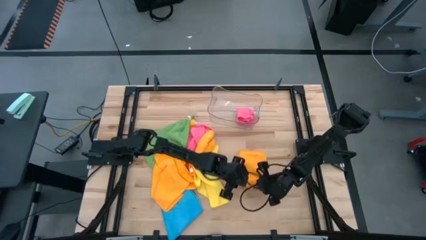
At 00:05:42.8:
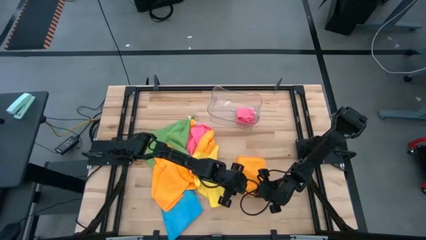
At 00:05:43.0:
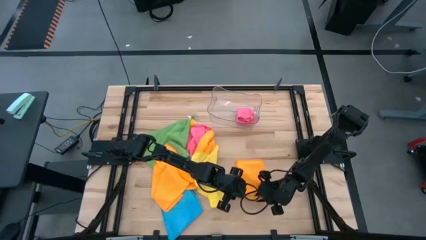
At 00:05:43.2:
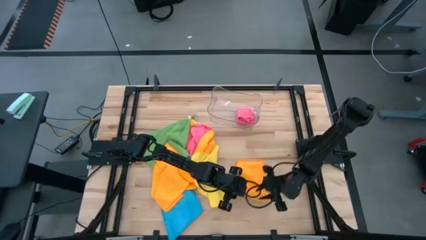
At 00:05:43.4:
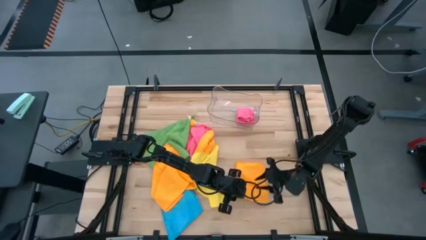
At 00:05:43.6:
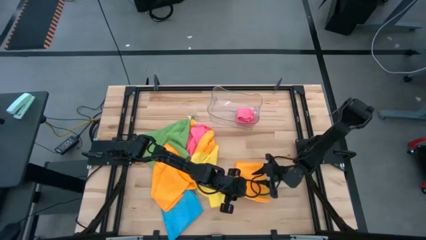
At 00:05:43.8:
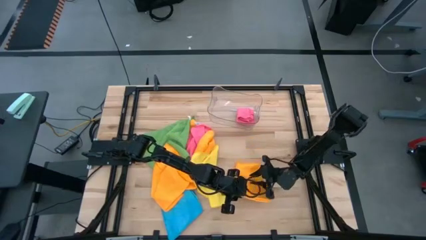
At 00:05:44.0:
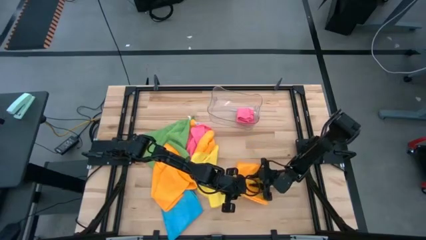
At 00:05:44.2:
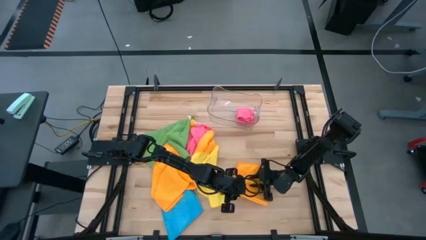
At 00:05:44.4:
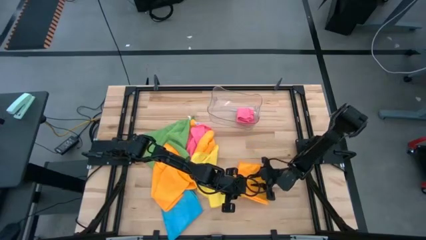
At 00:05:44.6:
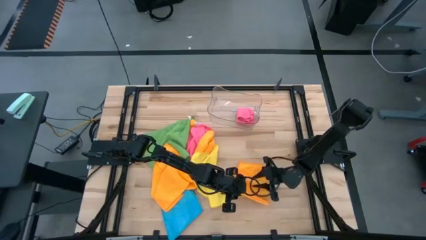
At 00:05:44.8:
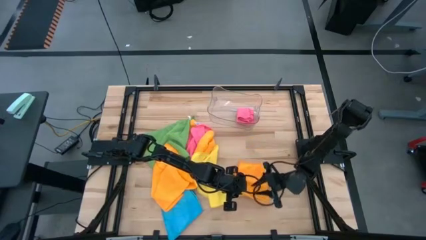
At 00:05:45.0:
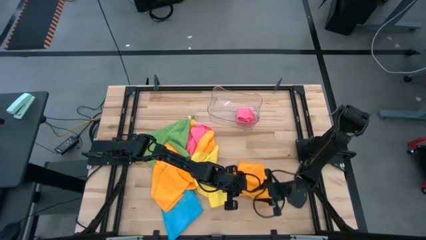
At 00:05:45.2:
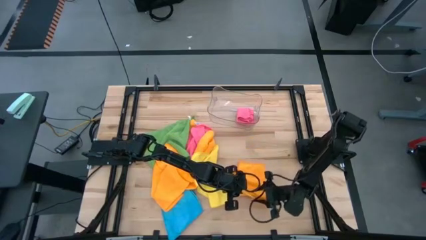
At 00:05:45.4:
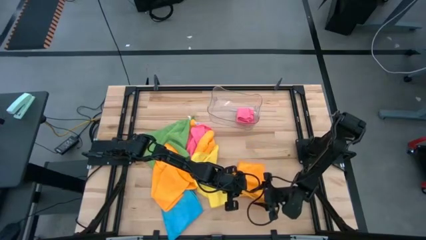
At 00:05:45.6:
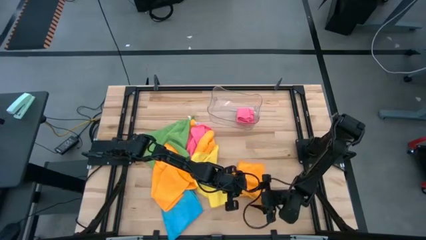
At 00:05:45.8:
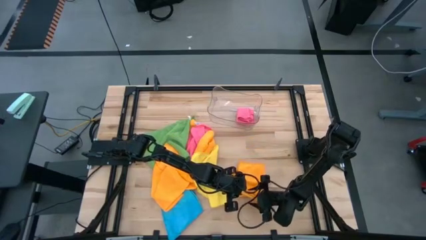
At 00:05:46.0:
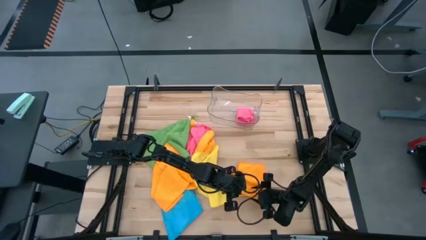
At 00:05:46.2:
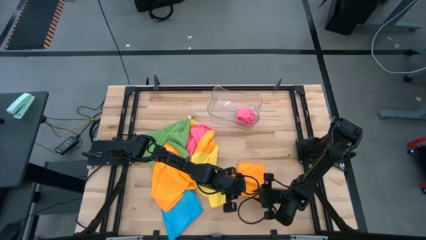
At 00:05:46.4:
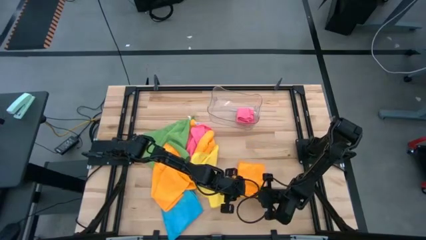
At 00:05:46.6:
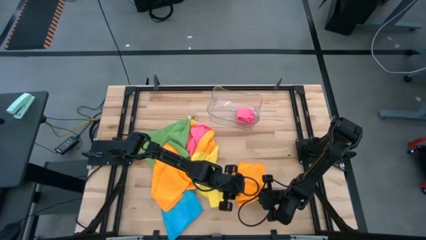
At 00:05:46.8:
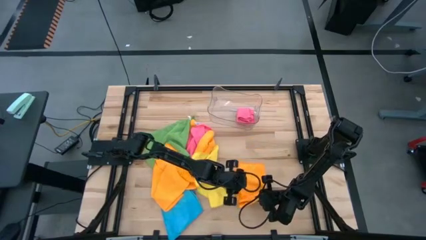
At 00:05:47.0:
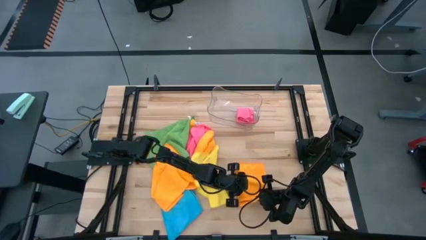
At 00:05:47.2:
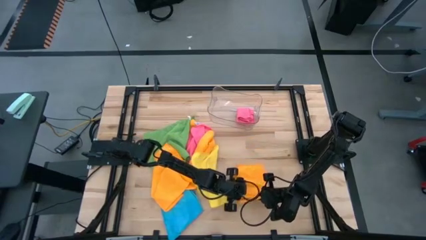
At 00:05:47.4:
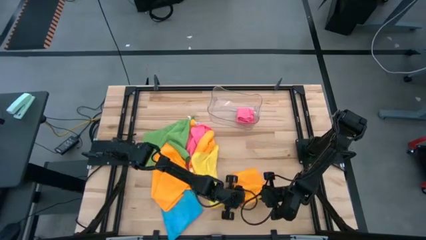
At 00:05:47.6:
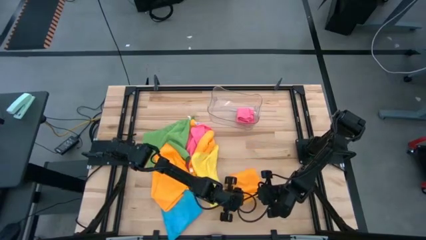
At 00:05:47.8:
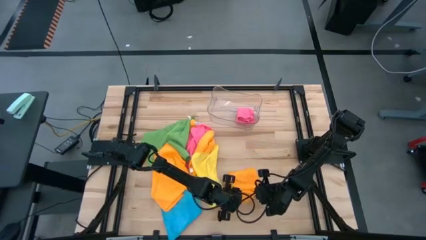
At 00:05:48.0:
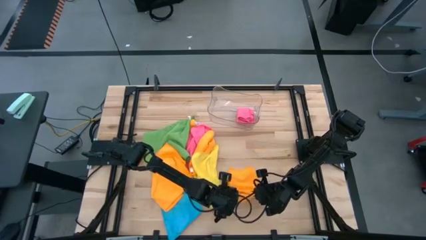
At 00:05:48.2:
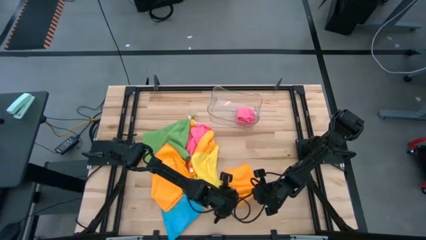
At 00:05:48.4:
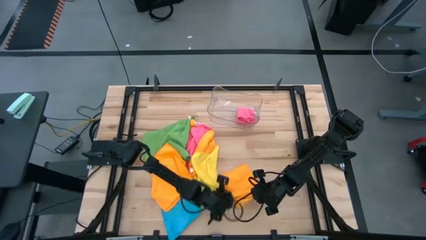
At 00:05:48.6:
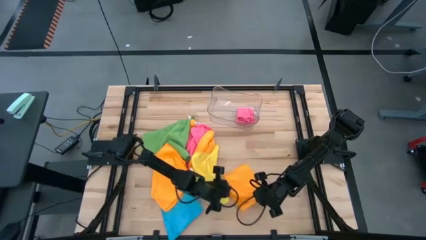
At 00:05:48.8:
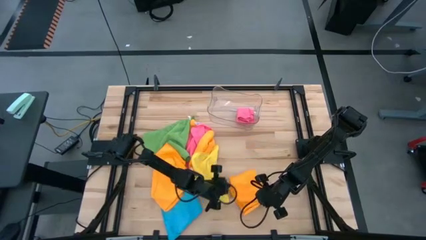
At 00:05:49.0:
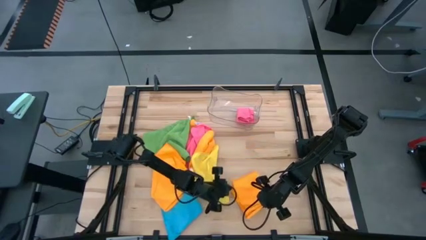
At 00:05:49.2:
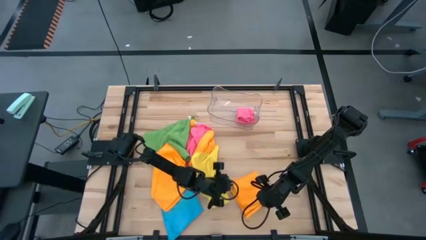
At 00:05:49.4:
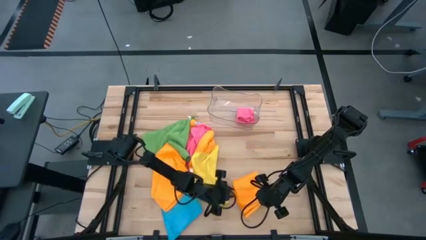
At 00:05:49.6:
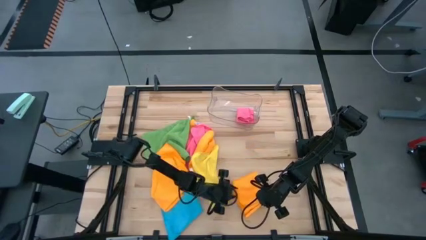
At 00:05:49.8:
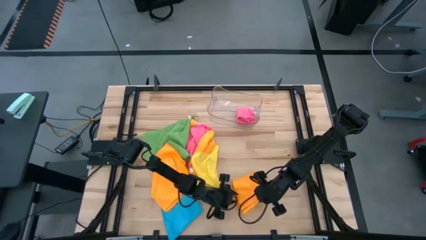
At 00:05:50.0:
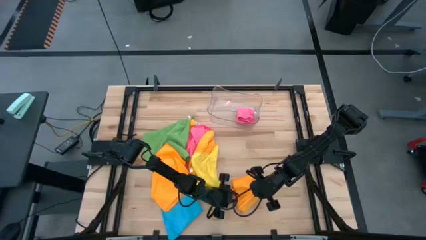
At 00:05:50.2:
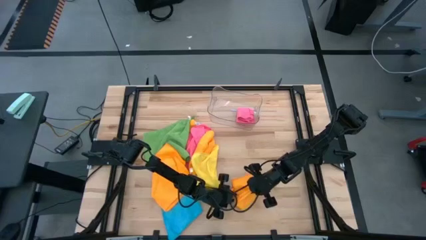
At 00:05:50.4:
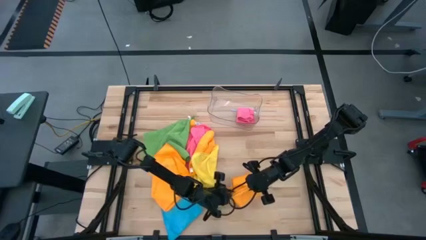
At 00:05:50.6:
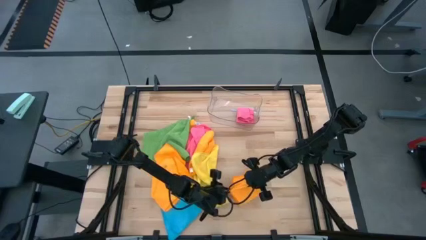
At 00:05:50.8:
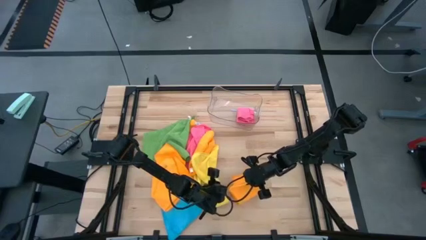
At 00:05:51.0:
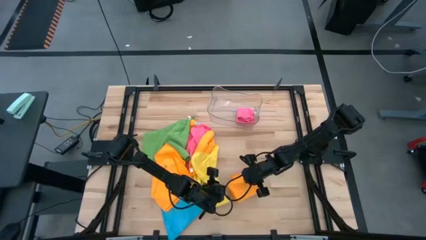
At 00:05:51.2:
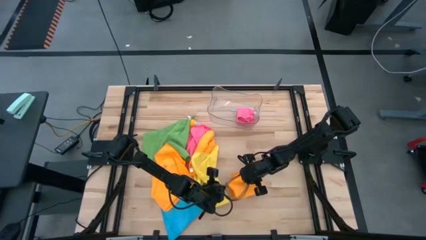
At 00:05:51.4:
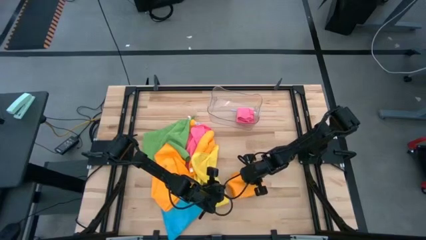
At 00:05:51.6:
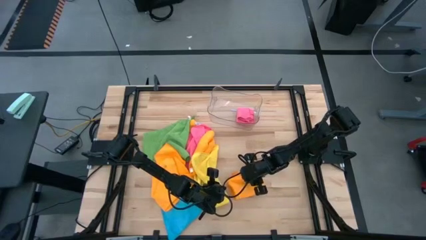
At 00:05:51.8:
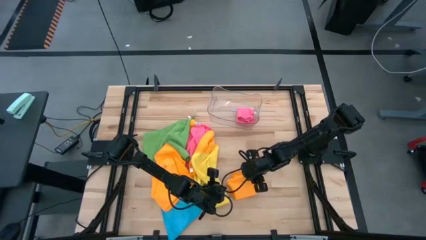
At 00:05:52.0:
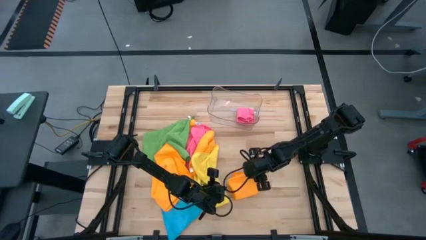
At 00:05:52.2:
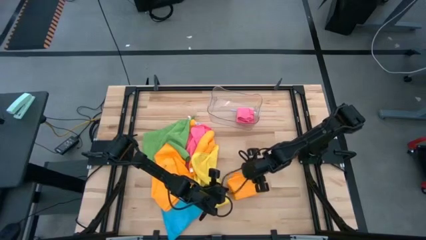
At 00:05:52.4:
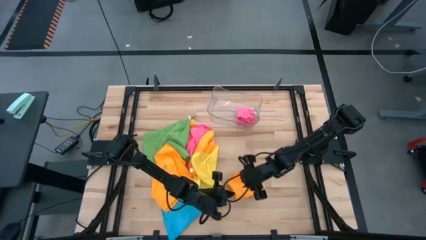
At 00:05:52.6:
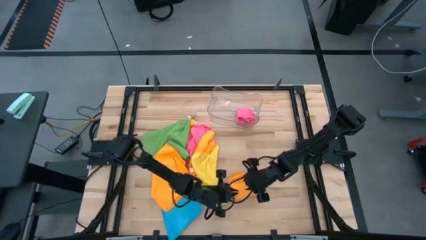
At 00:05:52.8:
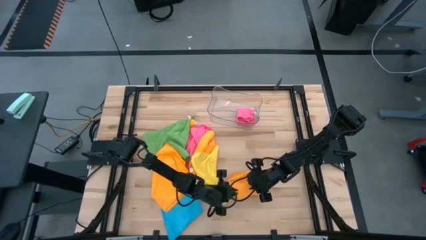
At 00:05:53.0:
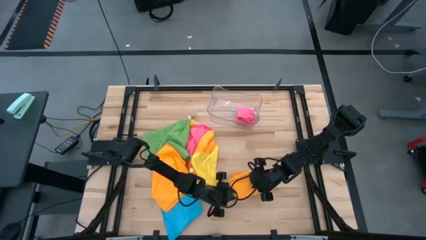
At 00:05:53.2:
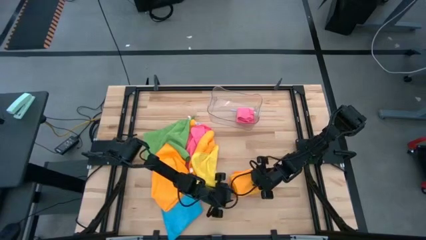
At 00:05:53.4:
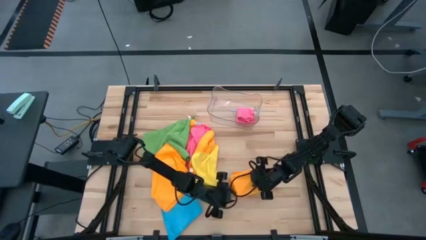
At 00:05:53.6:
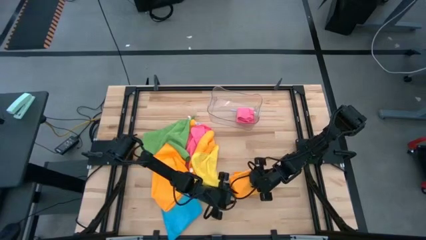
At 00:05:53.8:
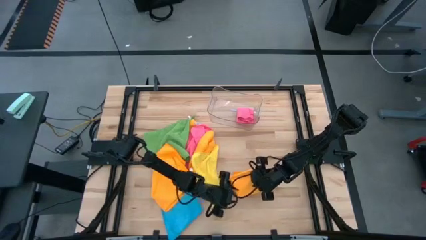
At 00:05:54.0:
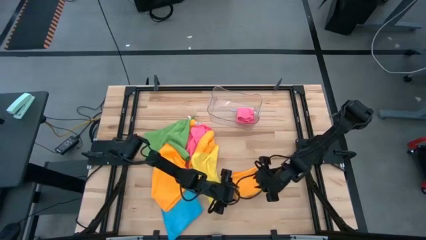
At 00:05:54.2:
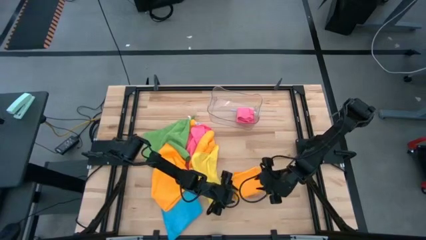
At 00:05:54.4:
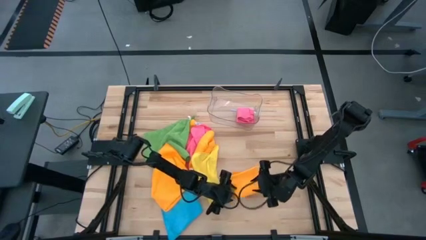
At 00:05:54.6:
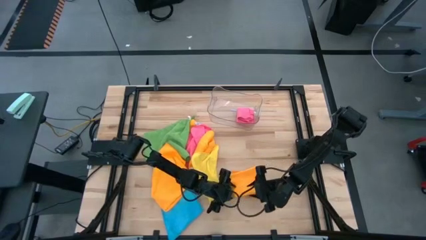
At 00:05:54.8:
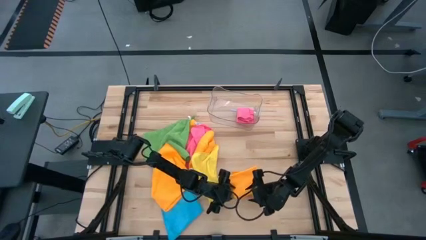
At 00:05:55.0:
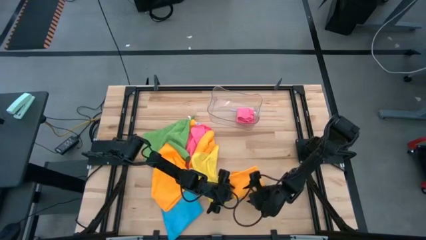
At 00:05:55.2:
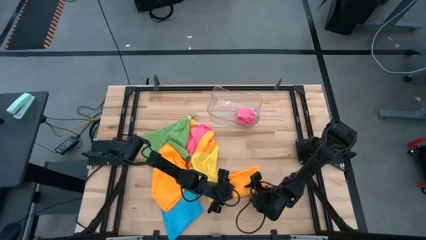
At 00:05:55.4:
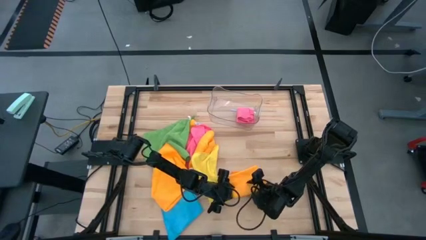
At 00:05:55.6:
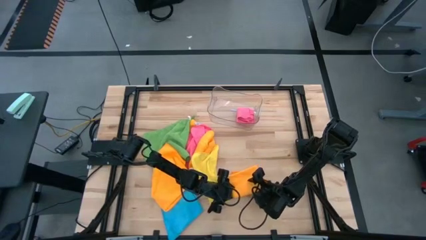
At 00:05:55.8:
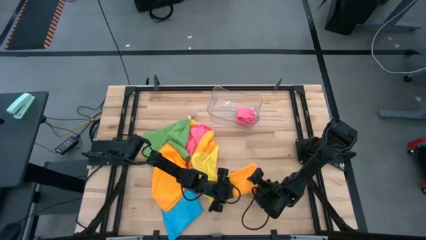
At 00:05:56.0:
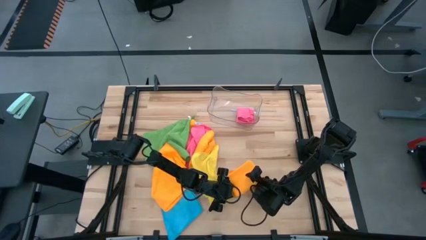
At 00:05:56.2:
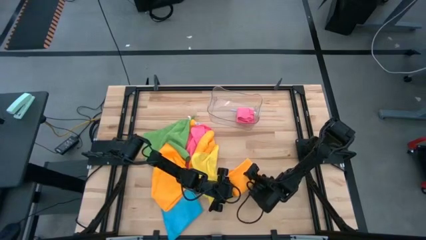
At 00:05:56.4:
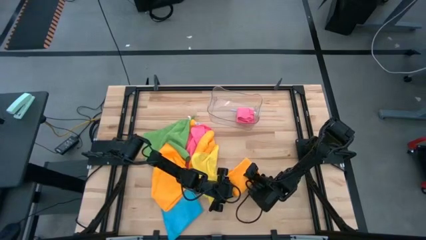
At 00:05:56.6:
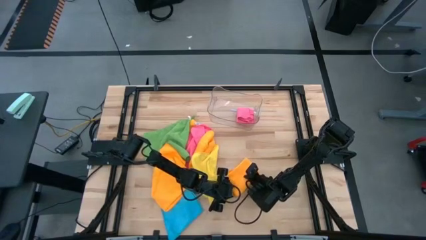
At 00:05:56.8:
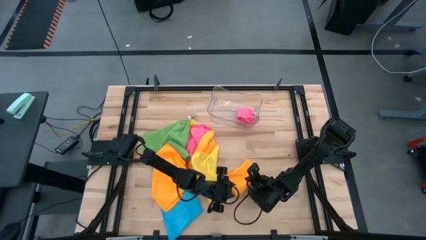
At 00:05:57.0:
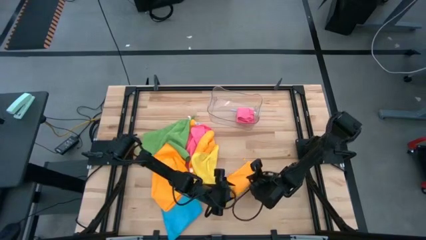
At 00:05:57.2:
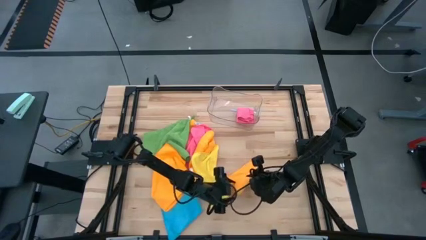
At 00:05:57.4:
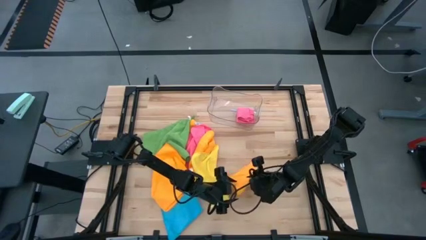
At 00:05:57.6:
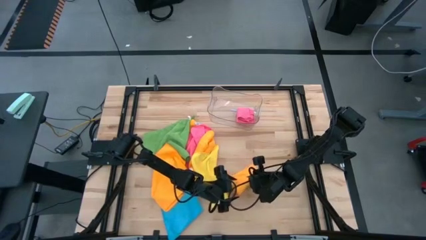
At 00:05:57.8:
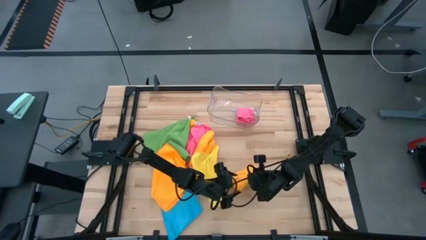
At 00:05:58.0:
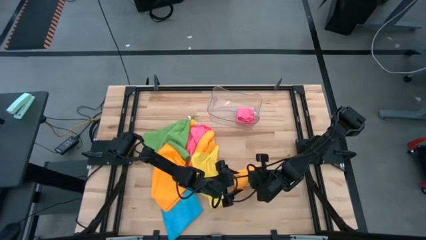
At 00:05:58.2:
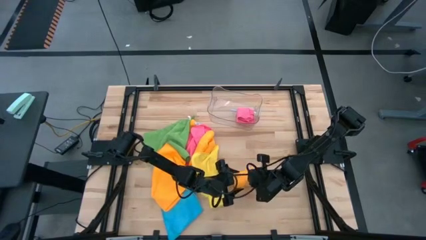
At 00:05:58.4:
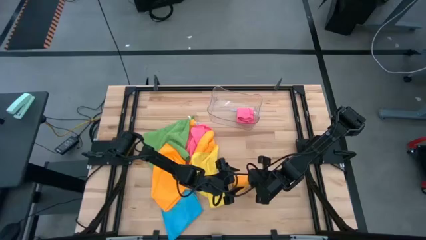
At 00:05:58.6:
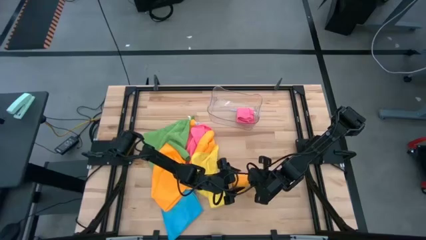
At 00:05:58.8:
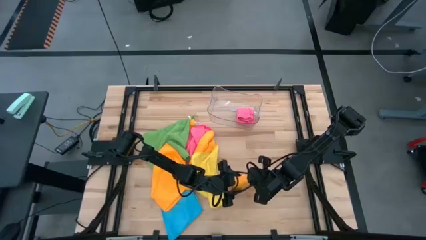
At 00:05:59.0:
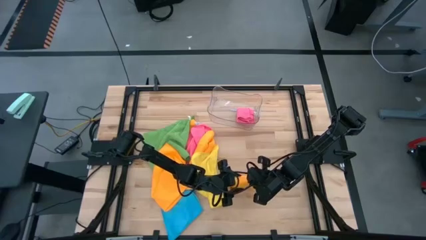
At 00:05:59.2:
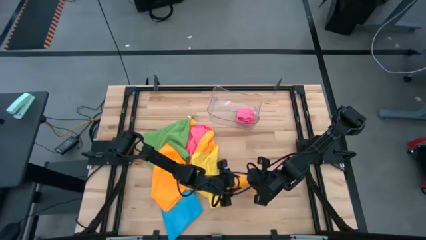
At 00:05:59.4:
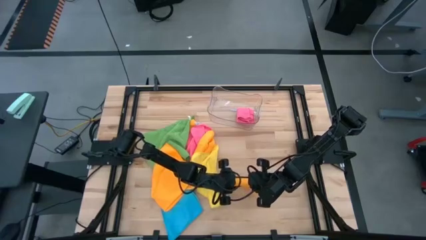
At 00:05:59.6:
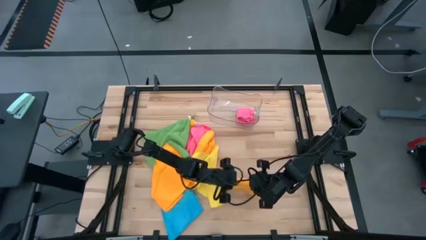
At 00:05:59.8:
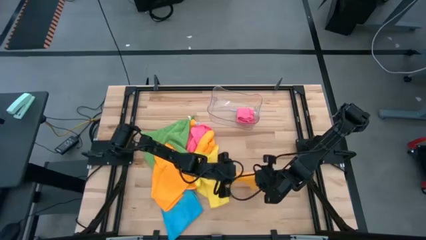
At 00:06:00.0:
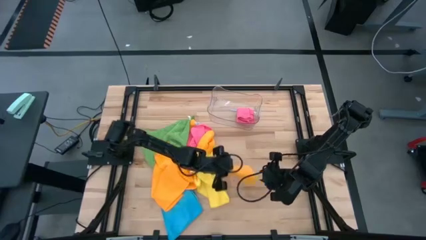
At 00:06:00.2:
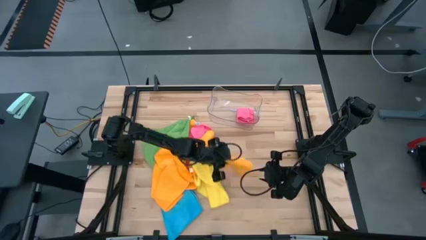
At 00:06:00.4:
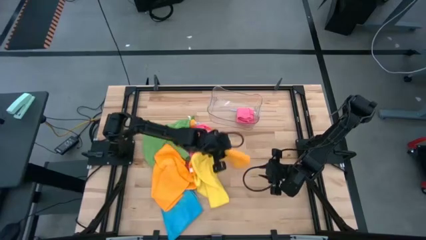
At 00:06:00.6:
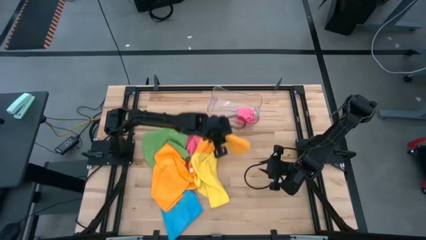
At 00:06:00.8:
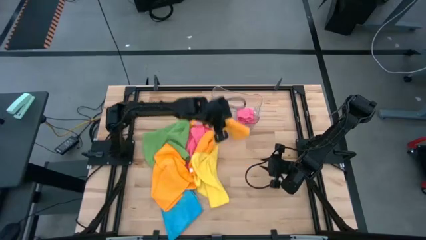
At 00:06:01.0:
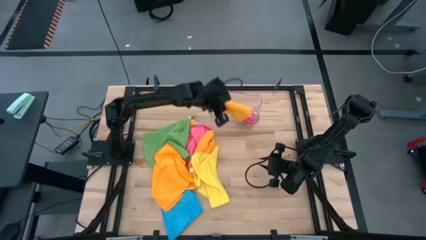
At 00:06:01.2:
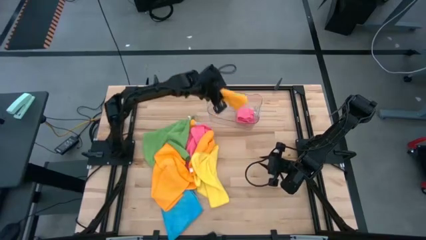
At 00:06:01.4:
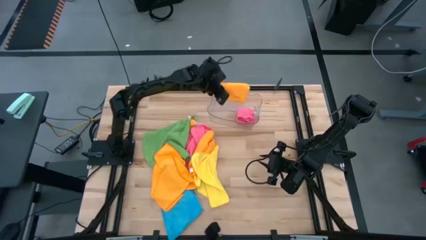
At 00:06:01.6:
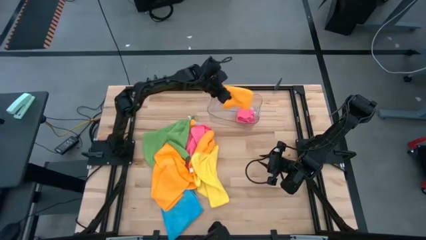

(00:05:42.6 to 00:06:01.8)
Task: Fold microfiber towels
Fold the right orange microfiber cloth
